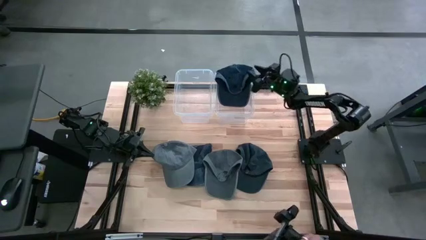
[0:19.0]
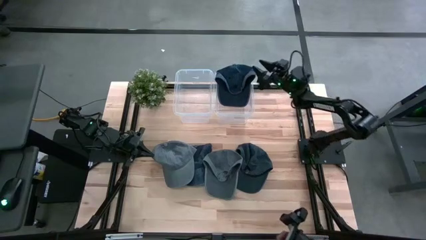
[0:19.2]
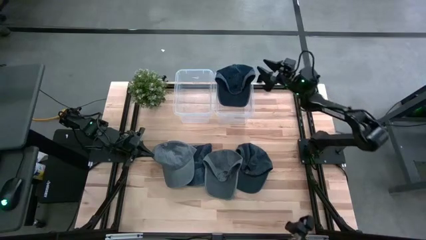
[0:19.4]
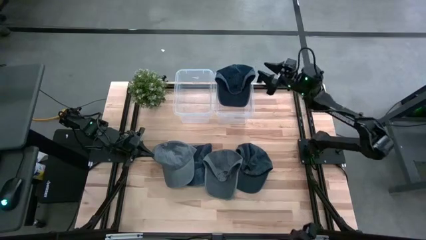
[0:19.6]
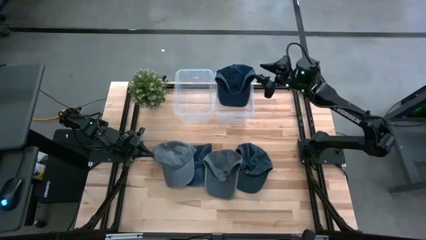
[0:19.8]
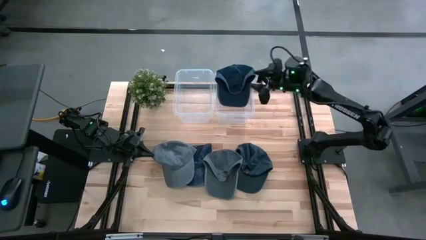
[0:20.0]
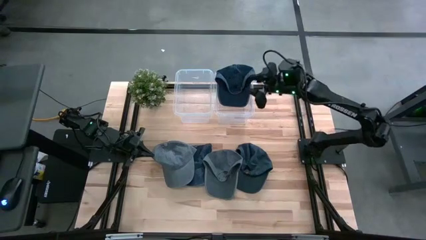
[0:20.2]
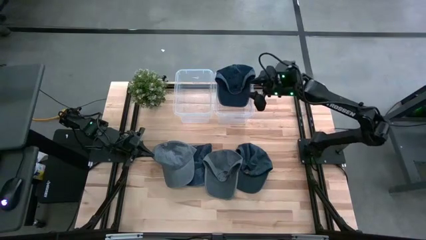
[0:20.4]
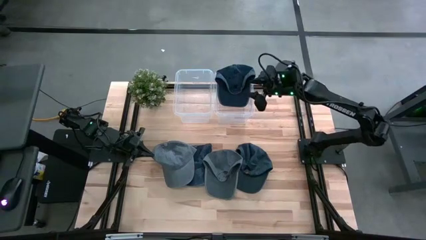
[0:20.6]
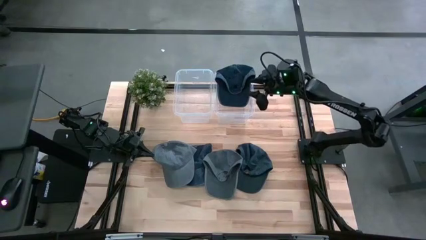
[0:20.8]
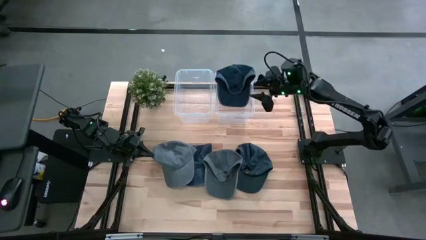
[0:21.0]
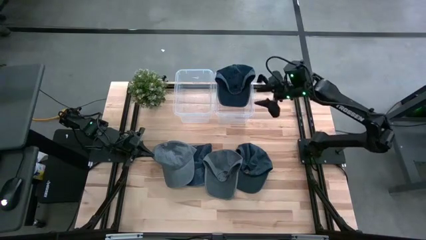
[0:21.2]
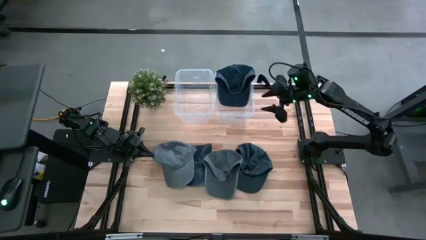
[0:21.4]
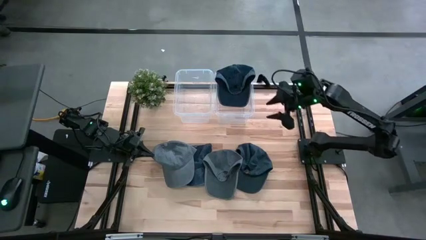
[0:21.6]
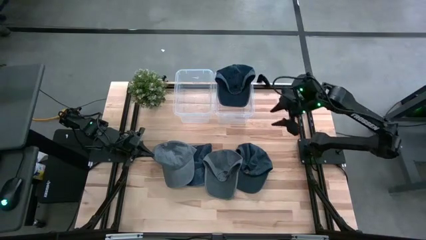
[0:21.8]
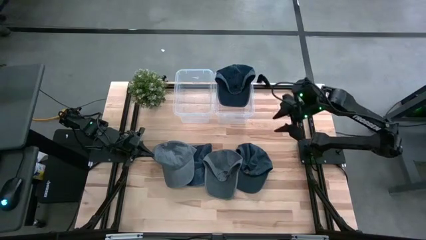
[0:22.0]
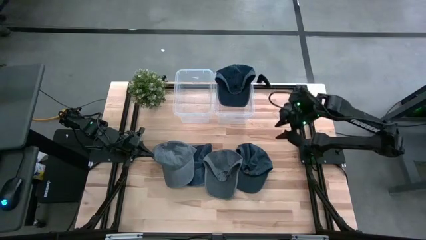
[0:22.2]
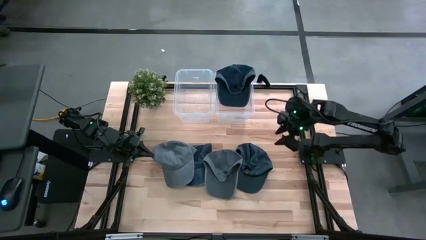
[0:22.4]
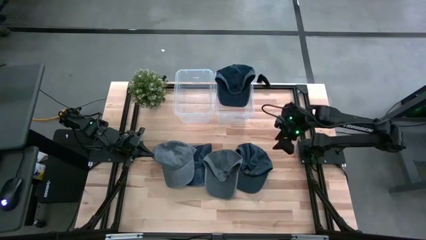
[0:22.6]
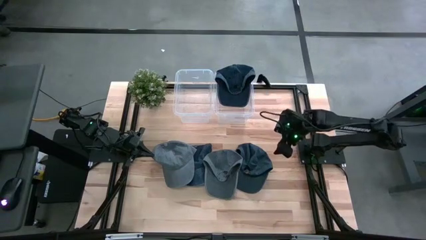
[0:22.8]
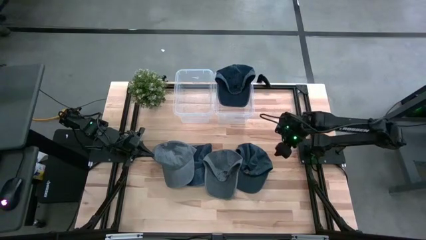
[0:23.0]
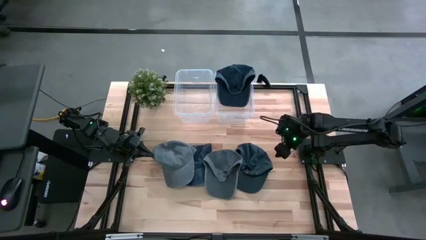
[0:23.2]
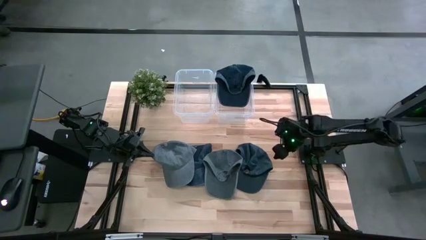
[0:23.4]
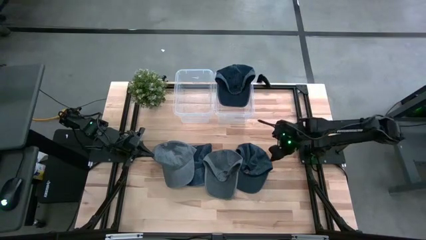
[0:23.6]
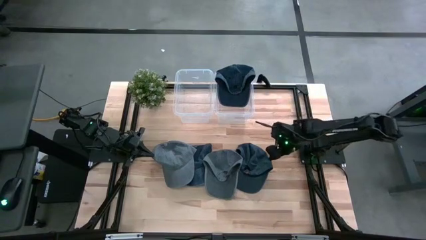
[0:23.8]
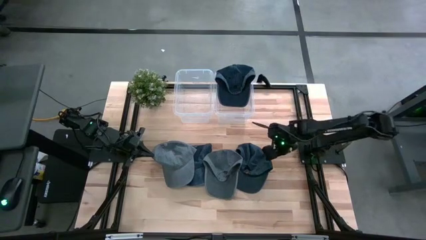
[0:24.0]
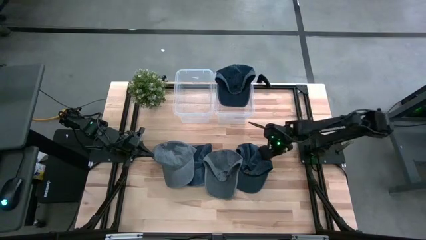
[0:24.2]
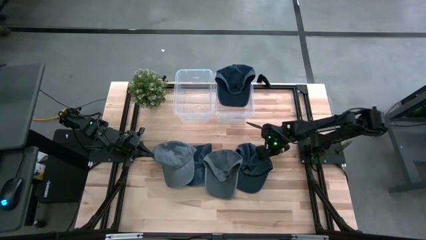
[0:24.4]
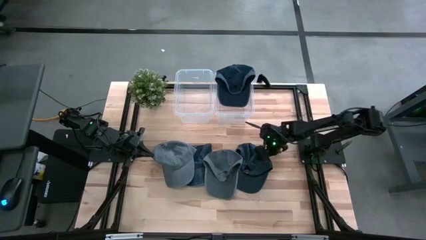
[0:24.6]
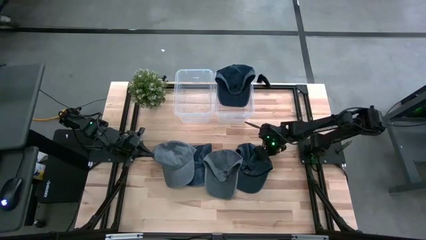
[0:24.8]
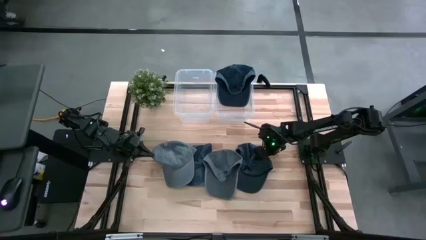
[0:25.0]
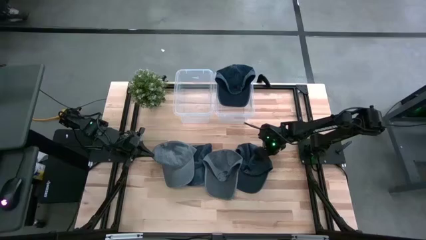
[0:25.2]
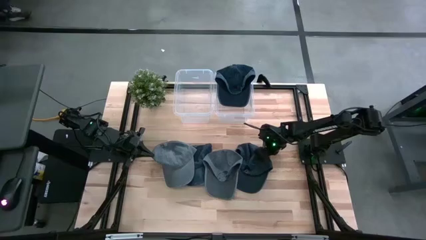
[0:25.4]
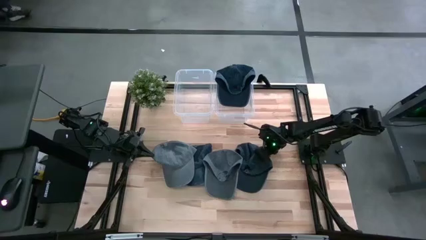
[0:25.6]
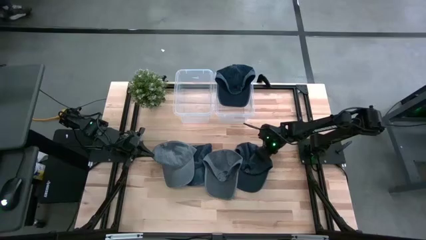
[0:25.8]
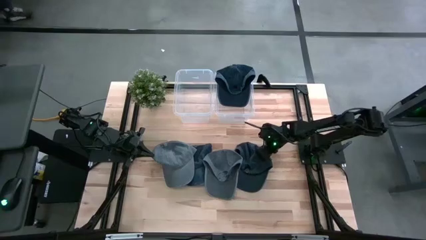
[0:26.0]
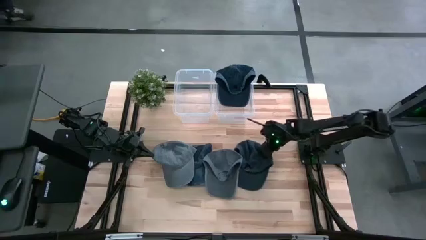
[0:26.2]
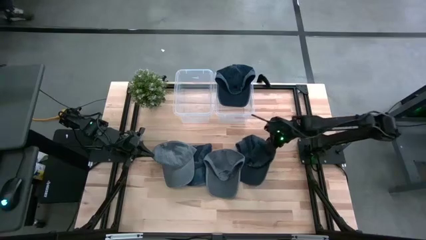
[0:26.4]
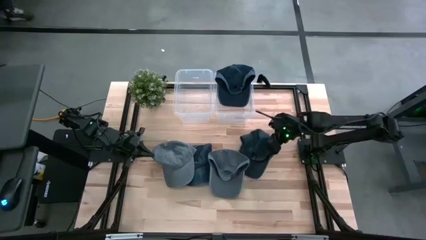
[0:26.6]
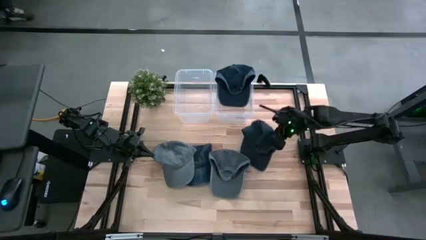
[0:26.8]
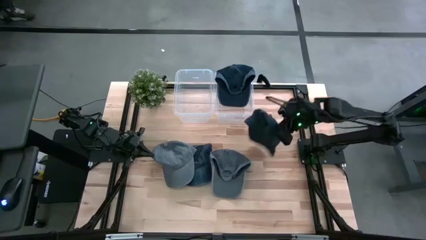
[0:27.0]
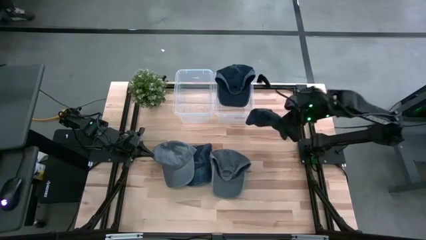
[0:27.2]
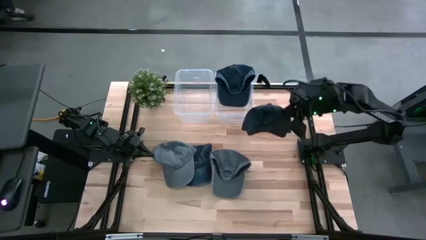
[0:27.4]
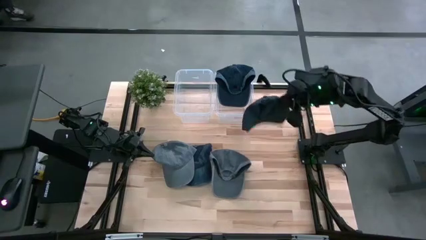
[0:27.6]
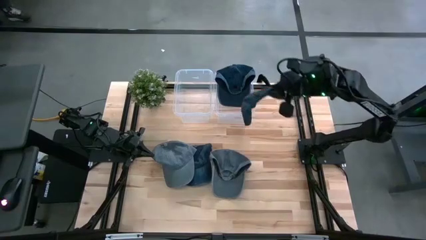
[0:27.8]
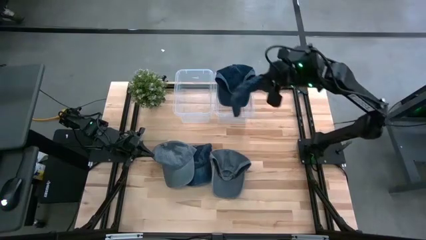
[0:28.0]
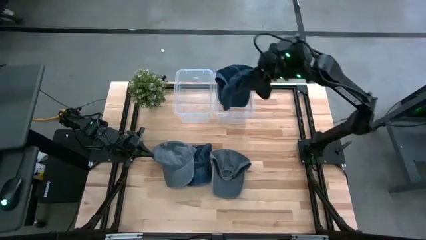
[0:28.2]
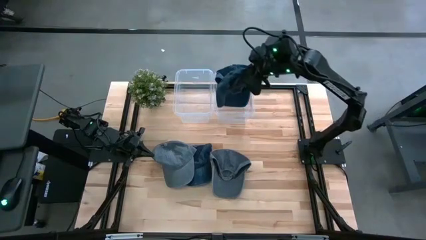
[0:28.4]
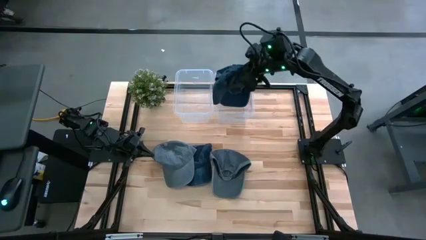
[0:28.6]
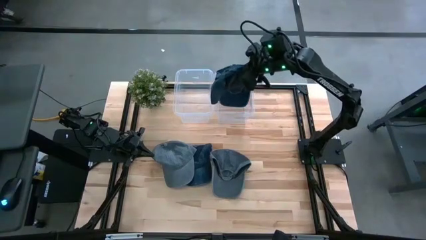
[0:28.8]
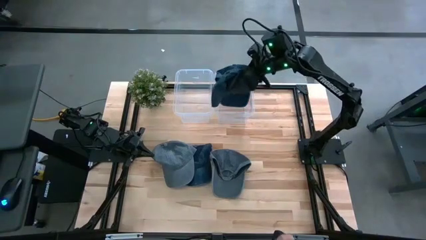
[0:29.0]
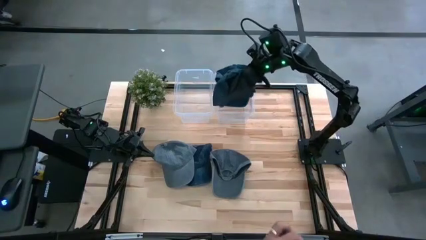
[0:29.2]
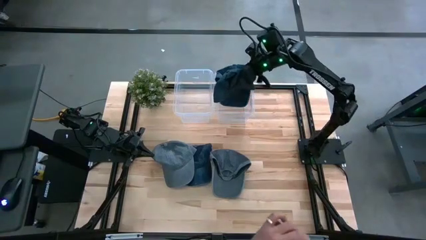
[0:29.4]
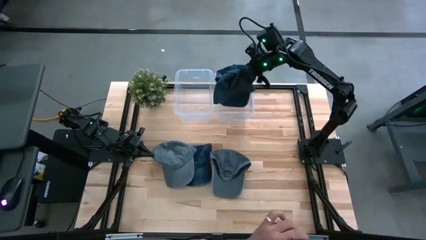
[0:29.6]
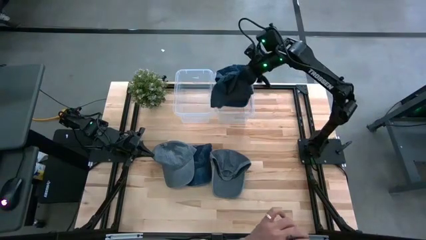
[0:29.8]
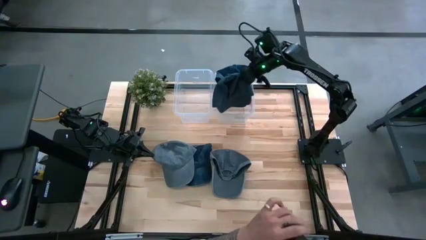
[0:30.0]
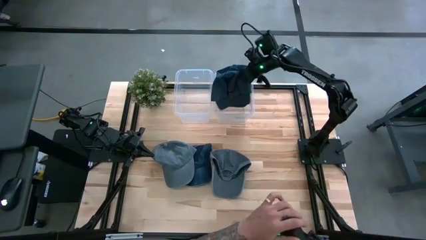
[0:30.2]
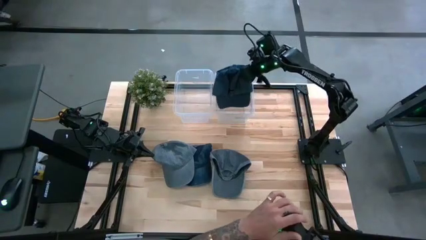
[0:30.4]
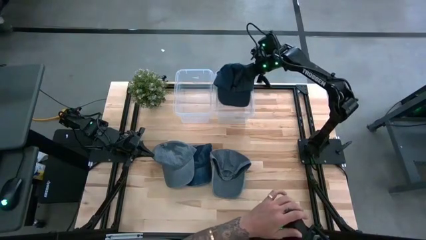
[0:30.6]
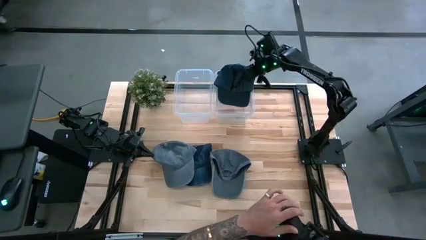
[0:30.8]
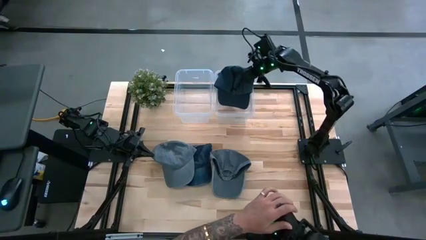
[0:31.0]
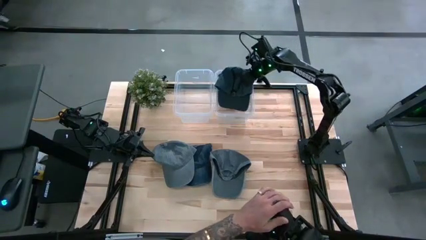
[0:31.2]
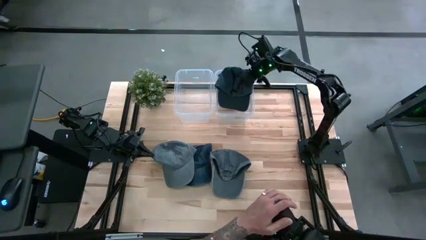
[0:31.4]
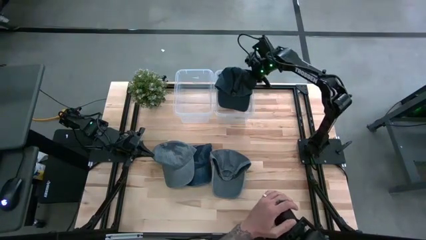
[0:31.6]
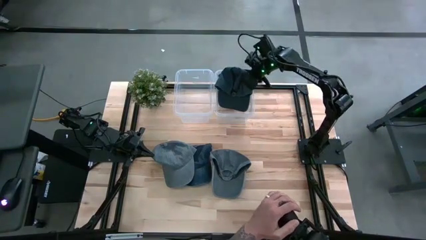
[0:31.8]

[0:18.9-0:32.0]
Task: Pick & Place hat
Put the right blue cap into the right transparent bin

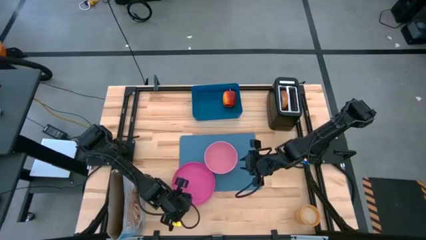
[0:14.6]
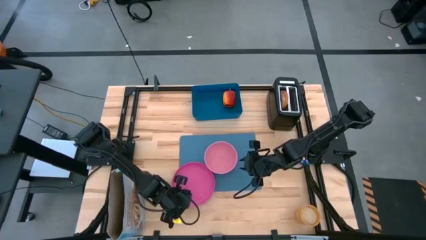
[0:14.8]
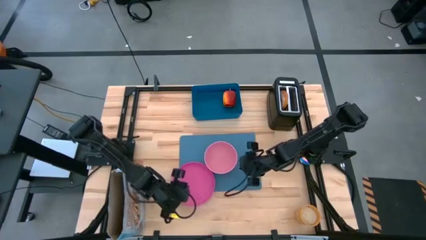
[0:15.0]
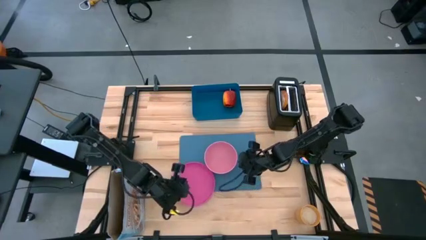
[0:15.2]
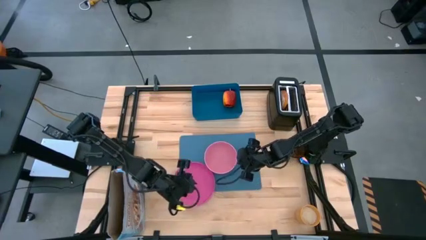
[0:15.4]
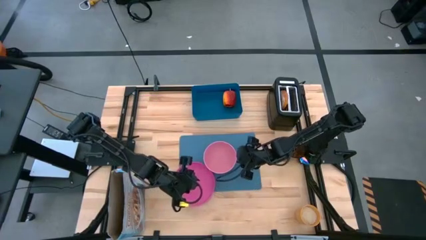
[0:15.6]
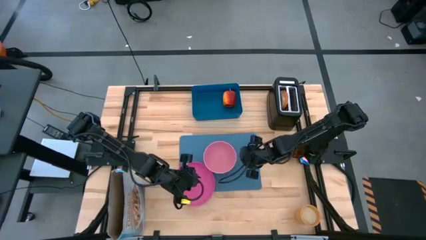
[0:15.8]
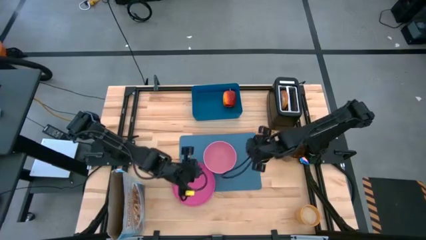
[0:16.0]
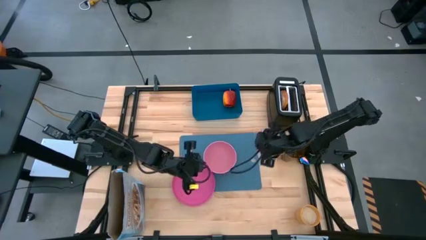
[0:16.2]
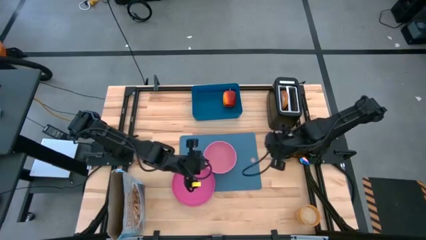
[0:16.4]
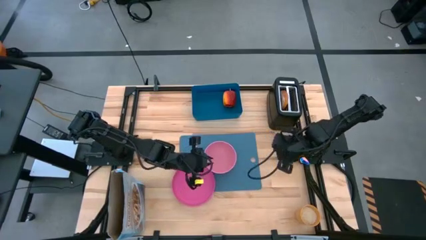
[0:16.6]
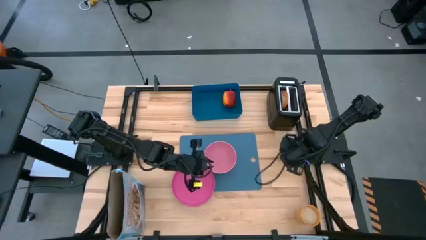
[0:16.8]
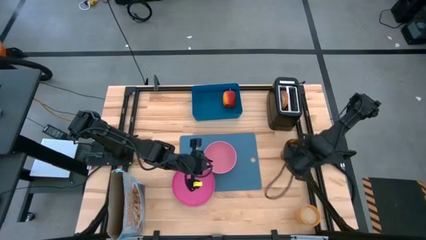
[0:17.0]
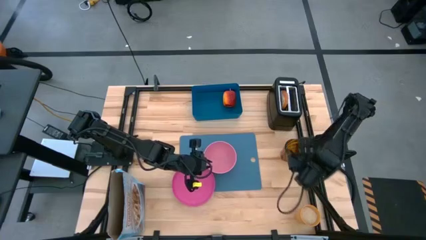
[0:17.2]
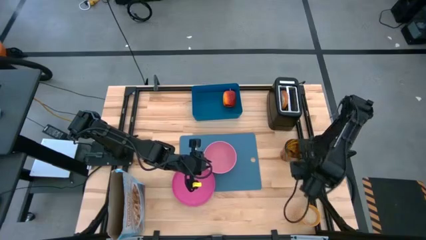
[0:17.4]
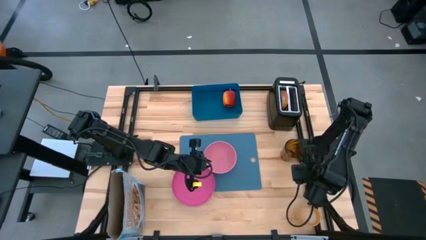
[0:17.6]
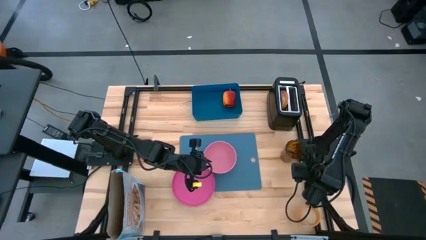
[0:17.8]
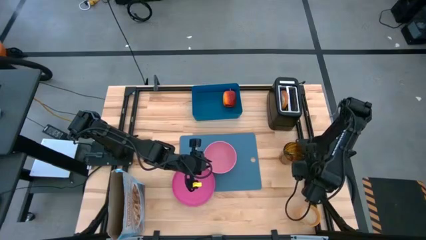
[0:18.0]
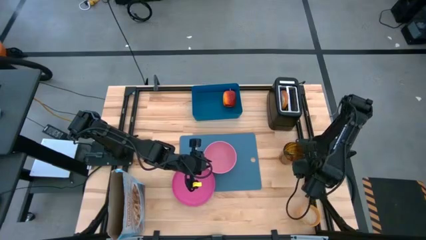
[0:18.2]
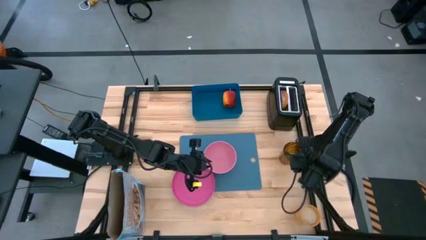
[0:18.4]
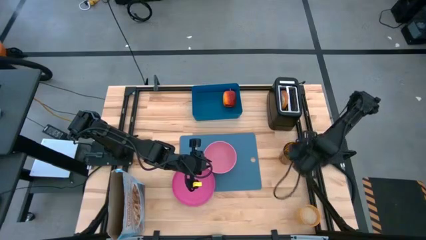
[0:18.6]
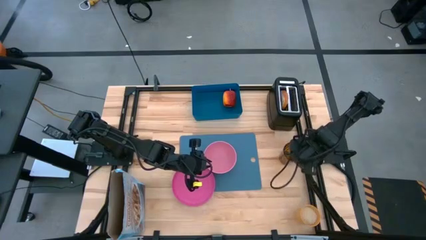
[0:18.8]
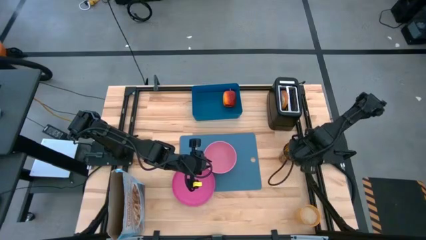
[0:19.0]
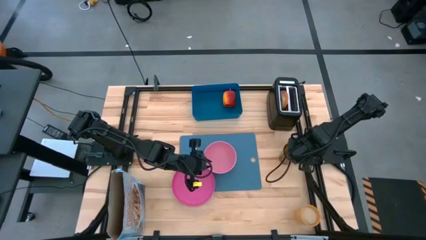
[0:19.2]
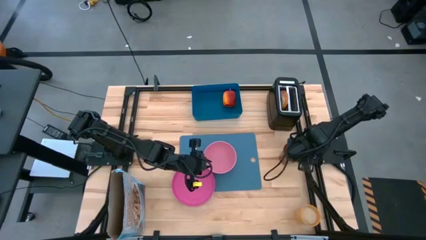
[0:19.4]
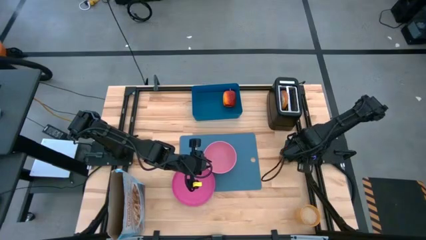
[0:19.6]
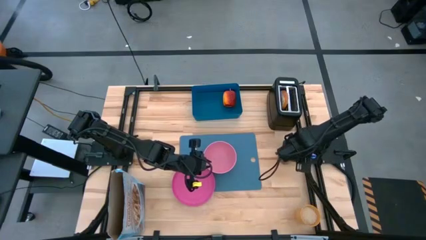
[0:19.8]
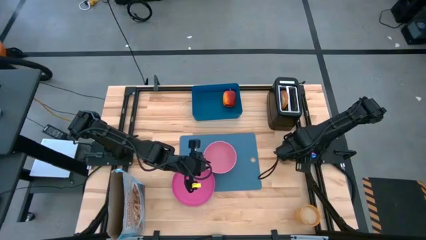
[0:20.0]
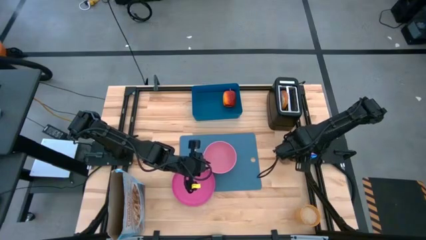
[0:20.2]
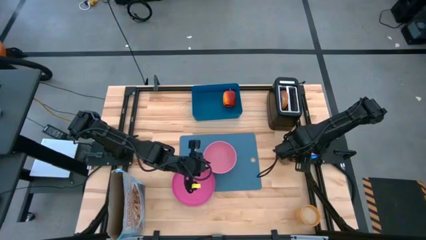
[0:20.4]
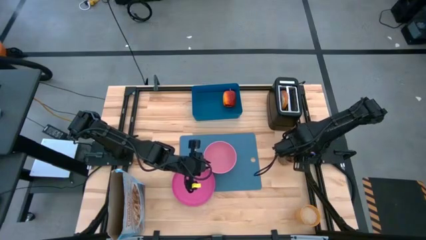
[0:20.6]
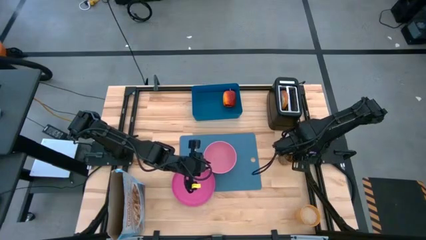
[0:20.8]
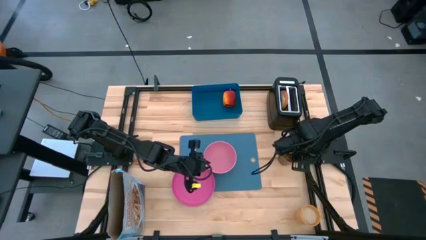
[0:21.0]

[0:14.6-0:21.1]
Task: Arrange a breakfast setting
Put the spoon to the right of the pink bowl on the blue table mat
